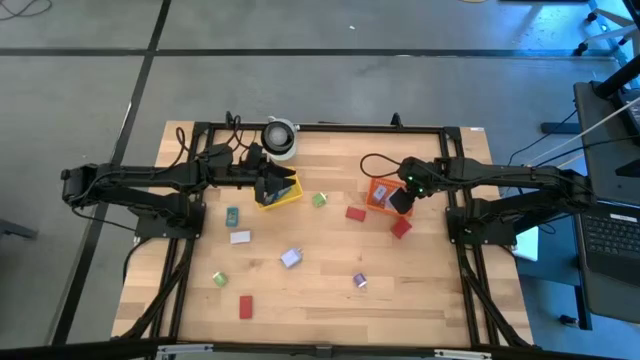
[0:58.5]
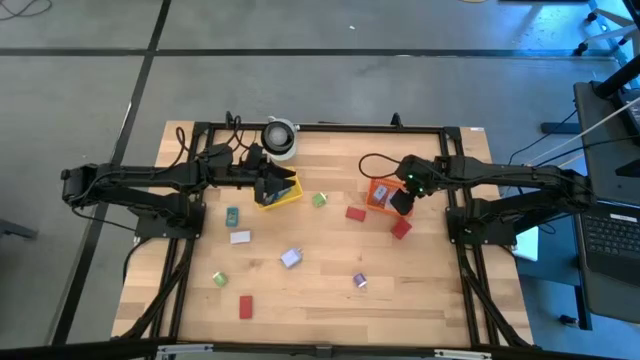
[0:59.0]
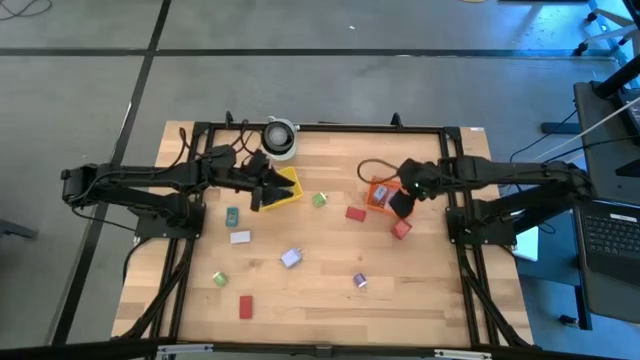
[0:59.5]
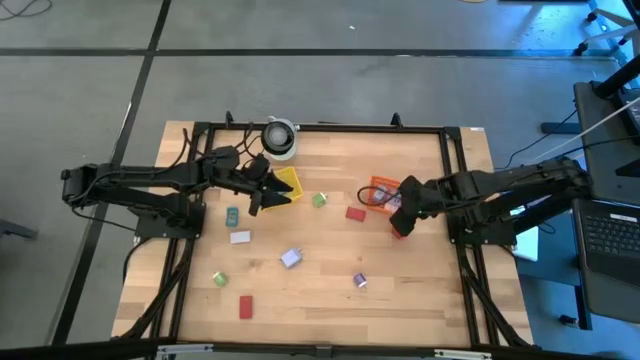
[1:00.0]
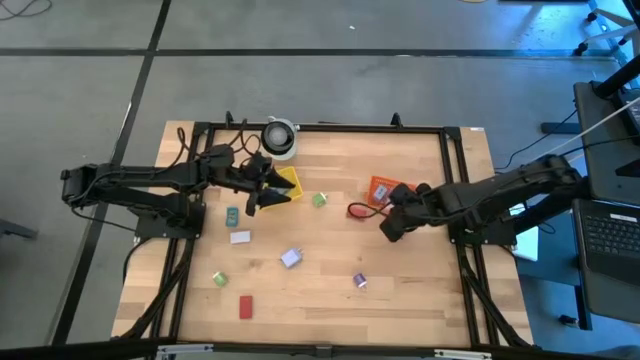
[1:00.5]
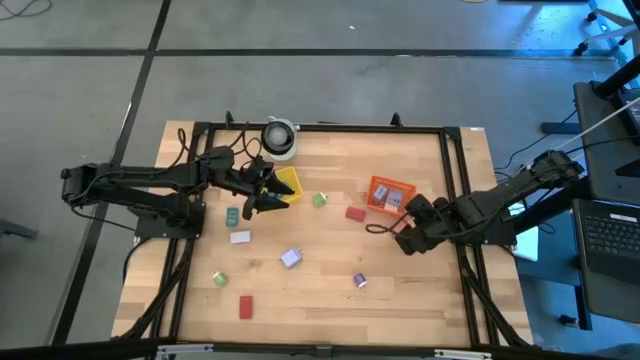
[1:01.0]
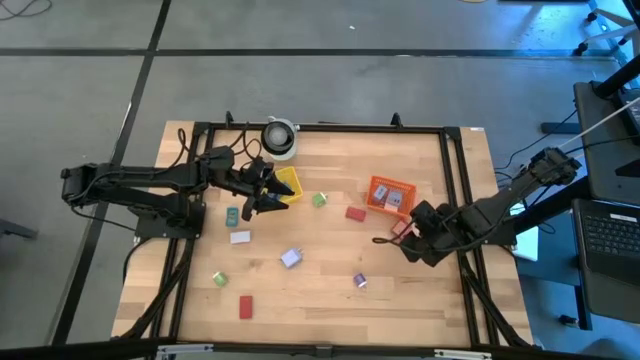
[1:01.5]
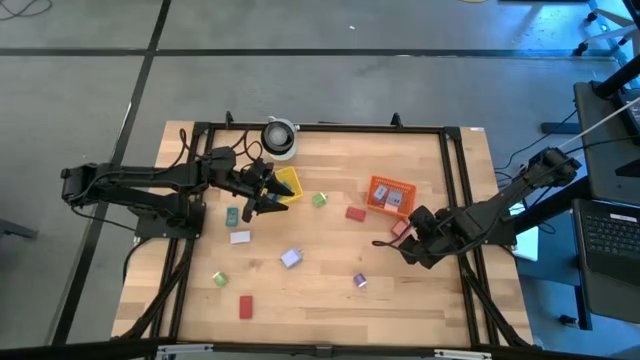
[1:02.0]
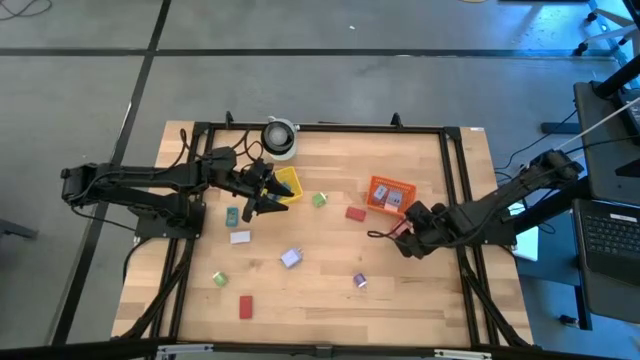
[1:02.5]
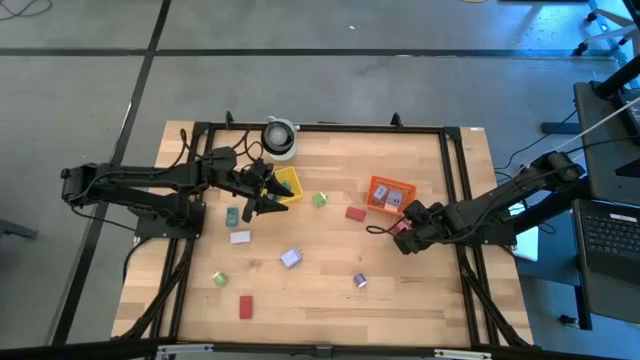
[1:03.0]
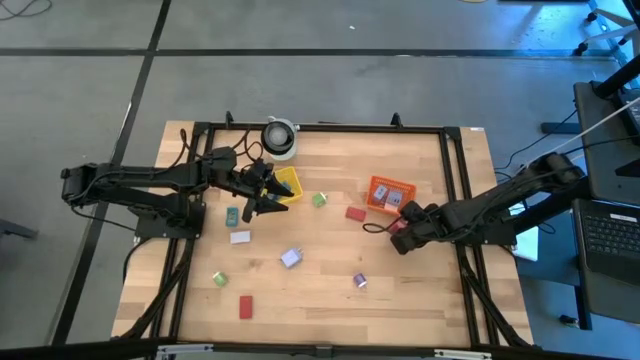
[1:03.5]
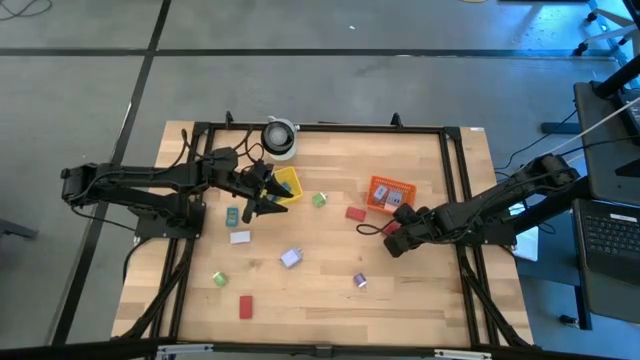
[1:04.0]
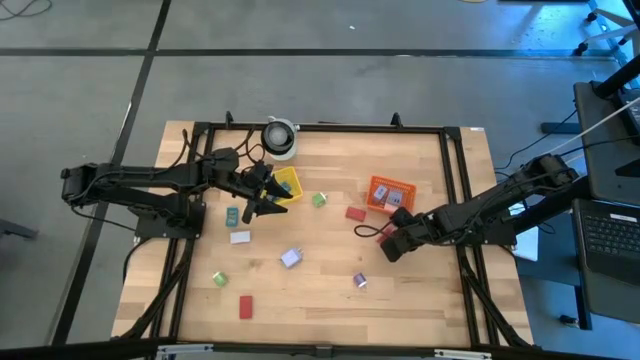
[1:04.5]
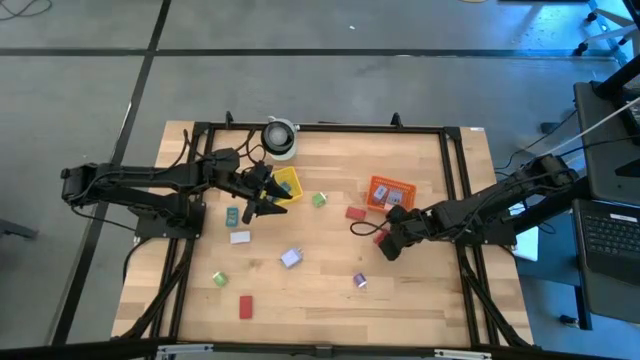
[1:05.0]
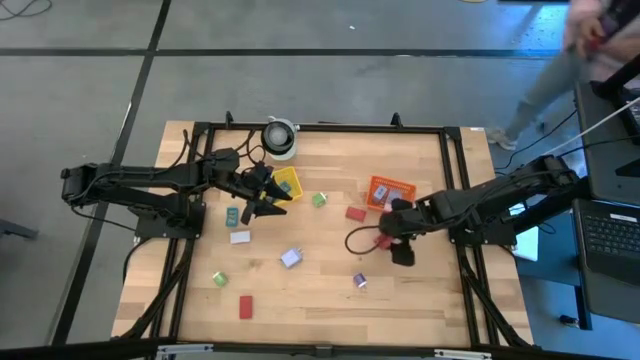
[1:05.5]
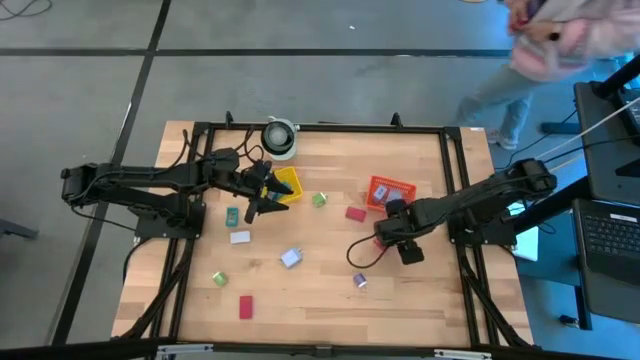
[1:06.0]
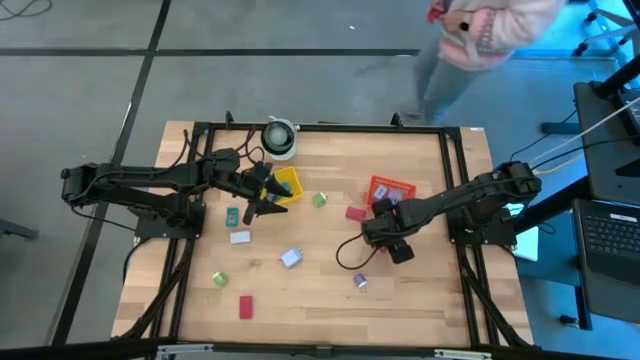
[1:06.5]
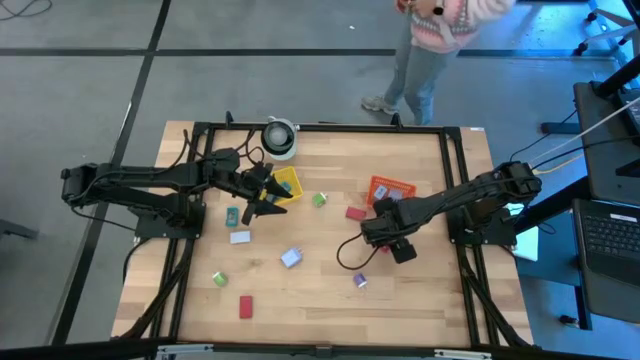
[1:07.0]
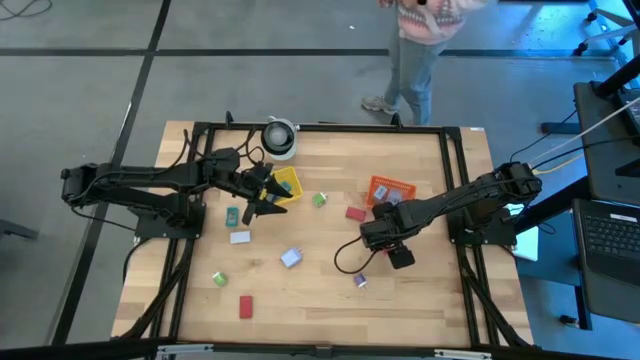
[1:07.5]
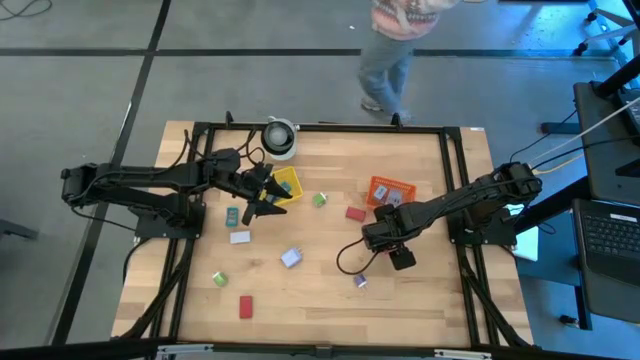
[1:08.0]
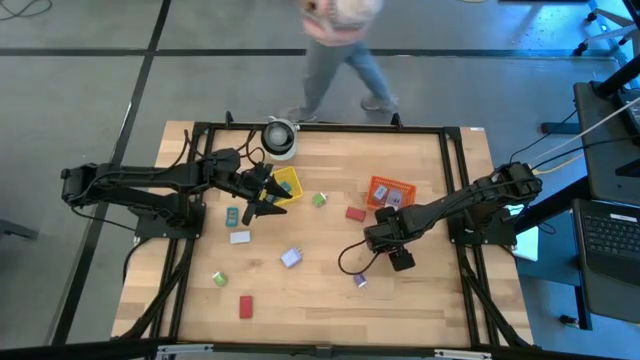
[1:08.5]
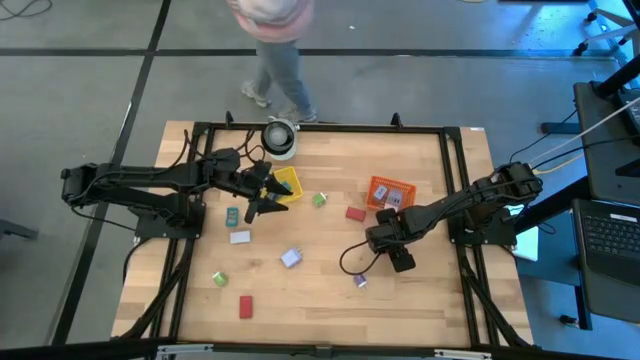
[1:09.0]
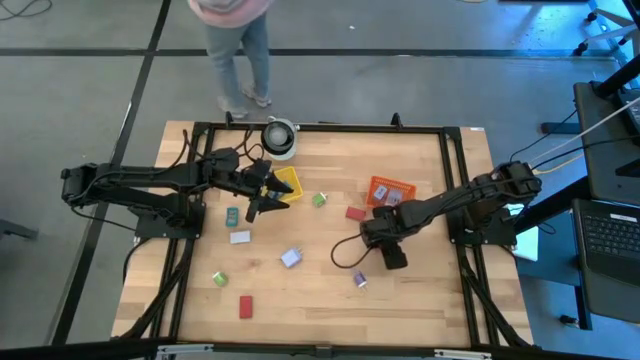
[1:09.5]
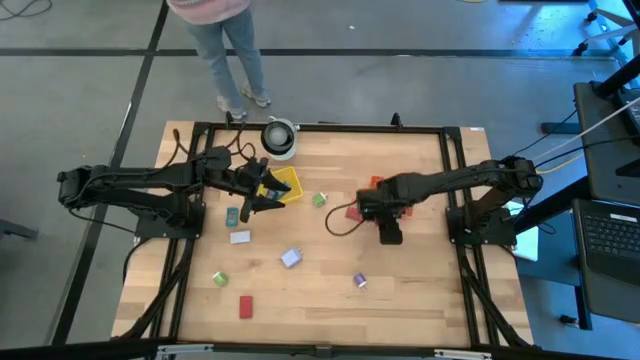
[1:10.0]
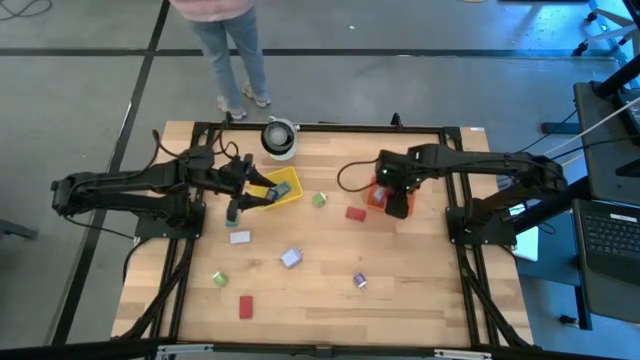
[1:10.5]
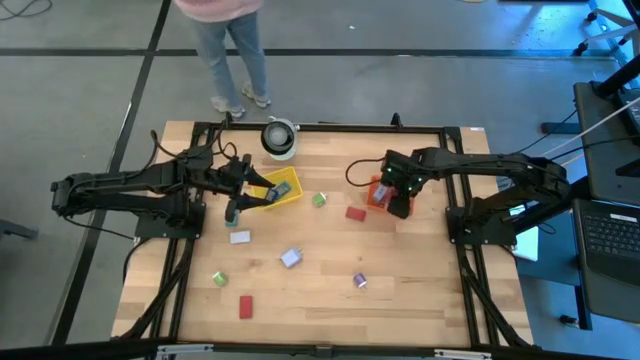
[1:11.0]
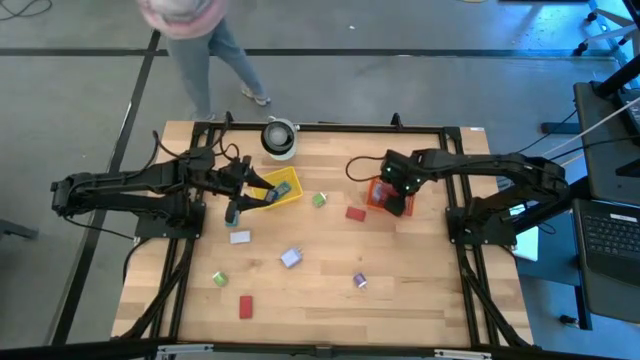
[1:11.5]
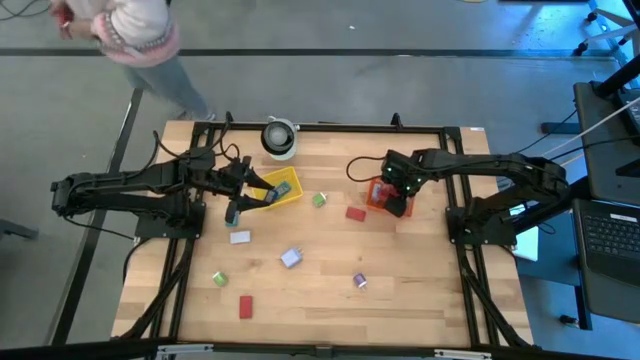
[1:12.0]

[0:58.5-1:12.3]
Task: Pick & Place Office items
Put the red charger adapter into the orange bin

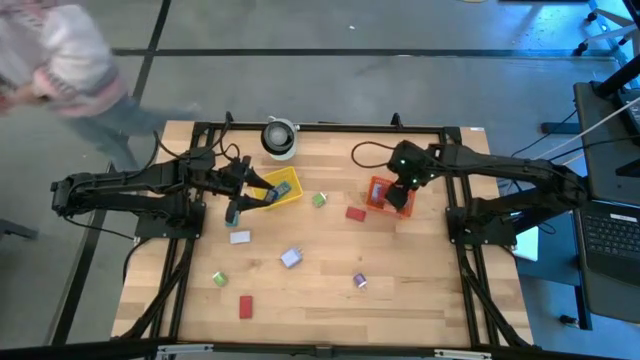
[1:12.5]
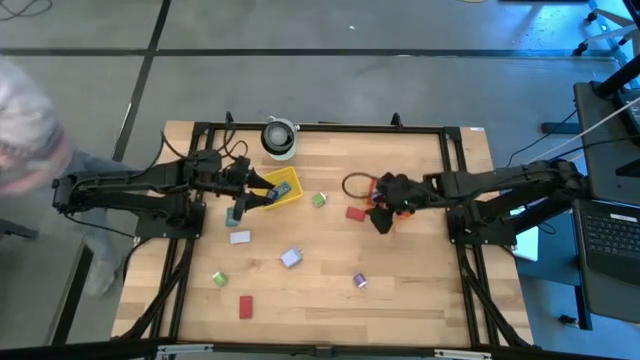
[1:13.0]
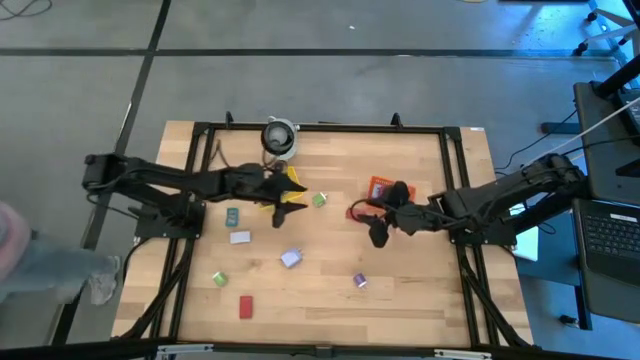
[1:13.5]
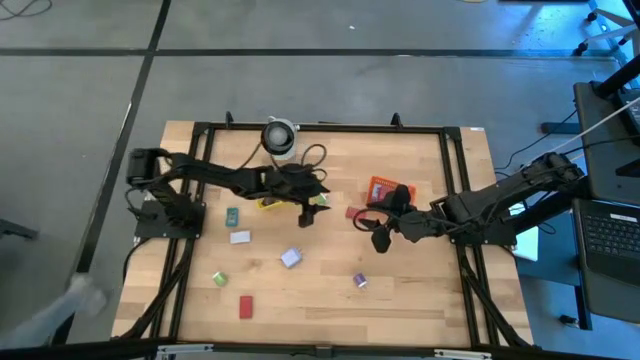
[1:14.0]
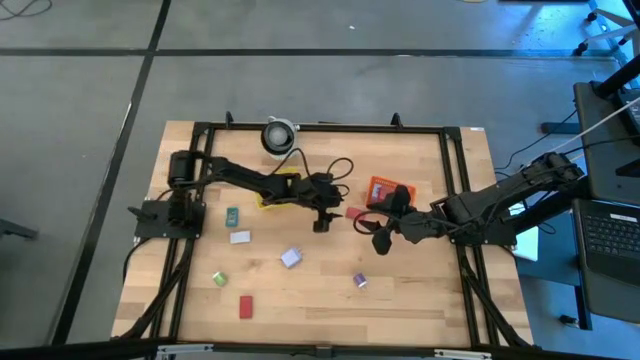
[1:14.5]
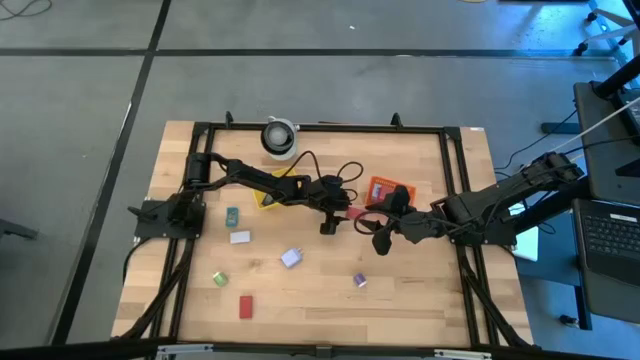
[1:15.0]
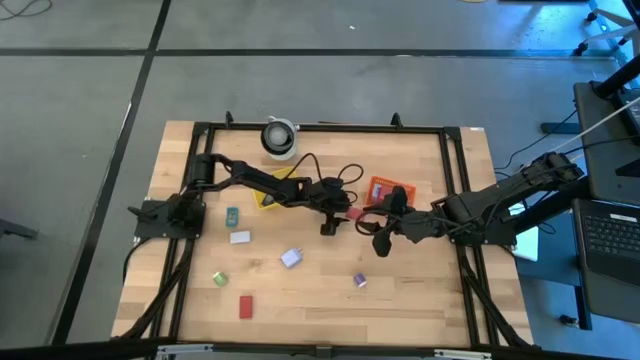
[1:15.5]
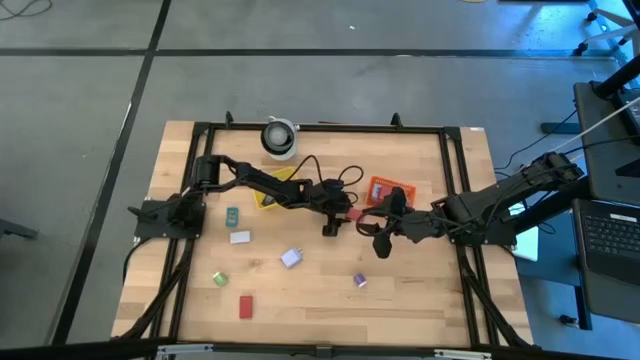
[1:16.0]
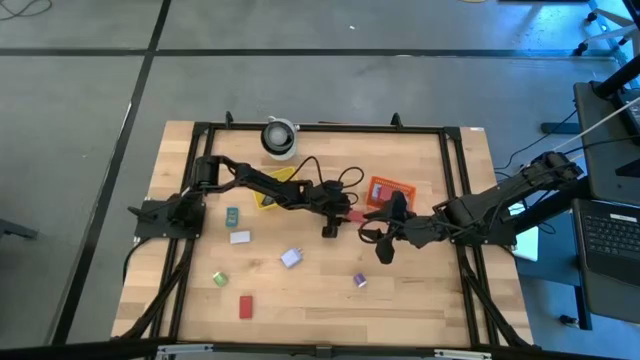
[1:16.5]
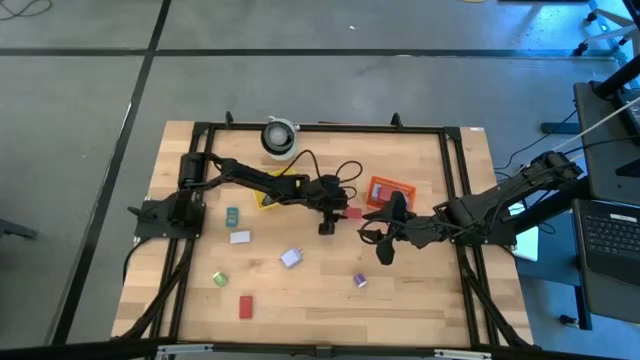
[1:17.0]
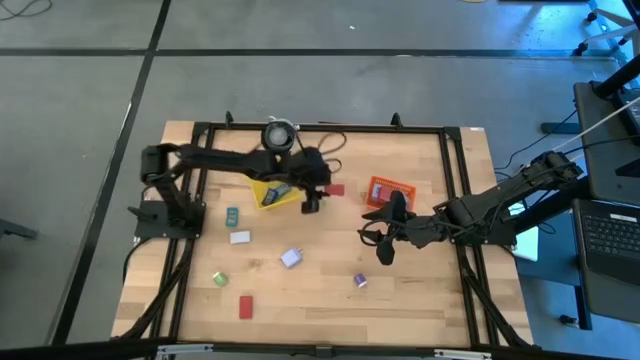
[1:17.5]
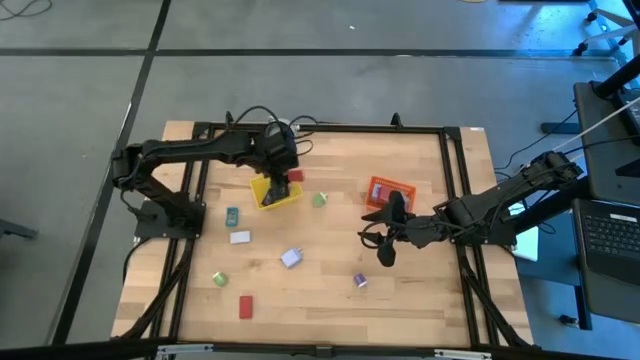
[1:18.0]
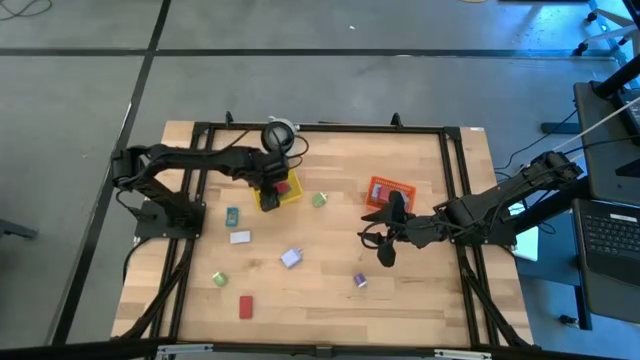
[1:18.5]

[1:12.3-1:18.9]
Put the top red digital clock into the yellow bin
